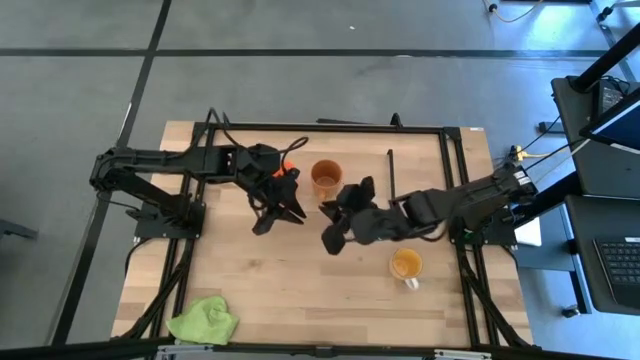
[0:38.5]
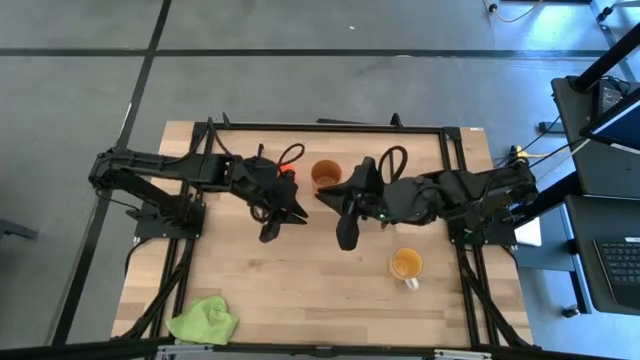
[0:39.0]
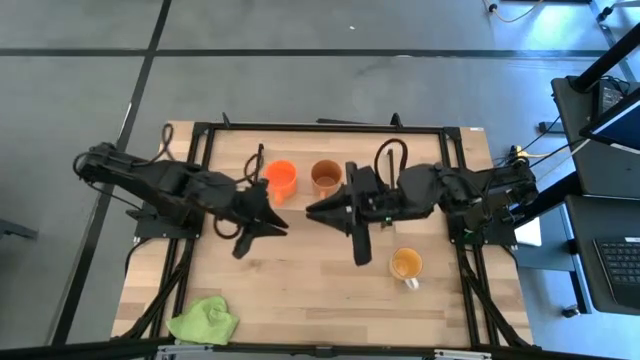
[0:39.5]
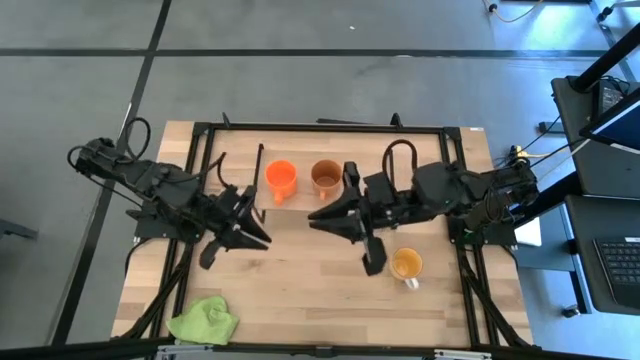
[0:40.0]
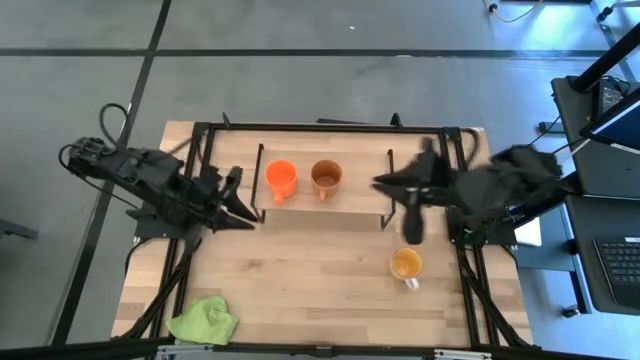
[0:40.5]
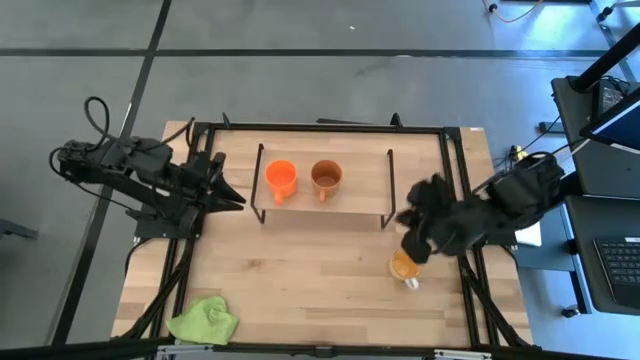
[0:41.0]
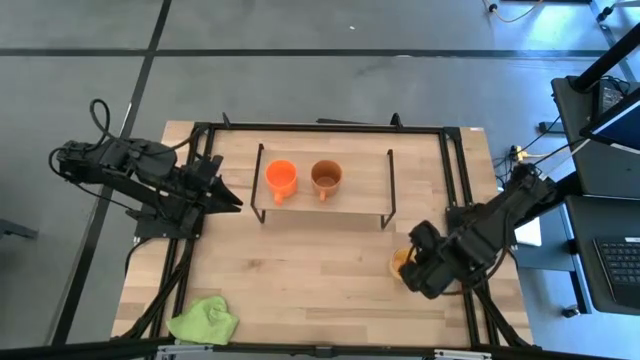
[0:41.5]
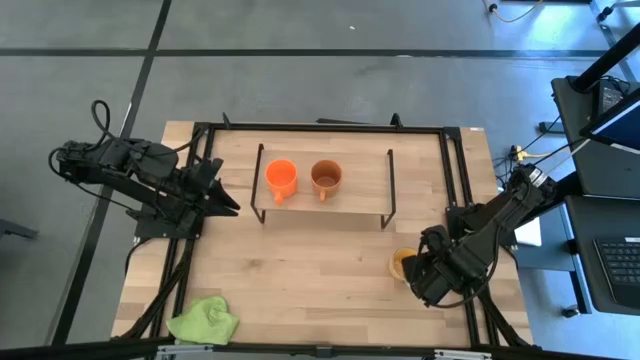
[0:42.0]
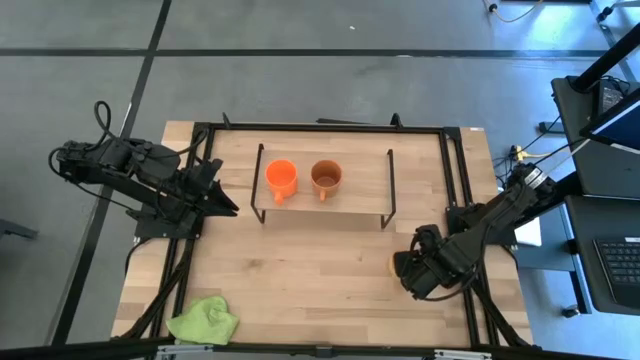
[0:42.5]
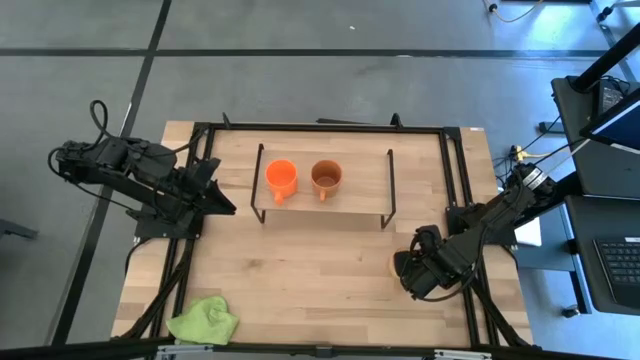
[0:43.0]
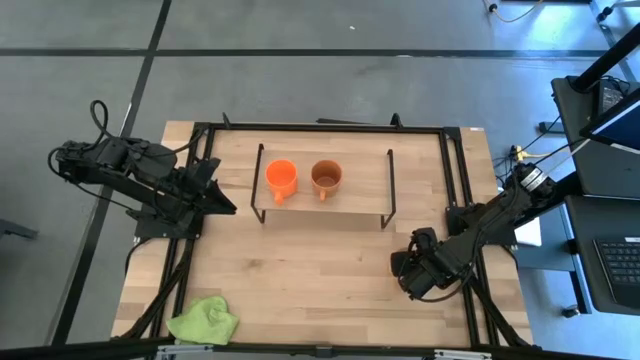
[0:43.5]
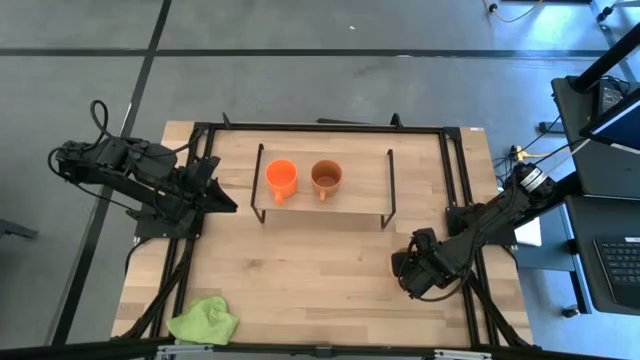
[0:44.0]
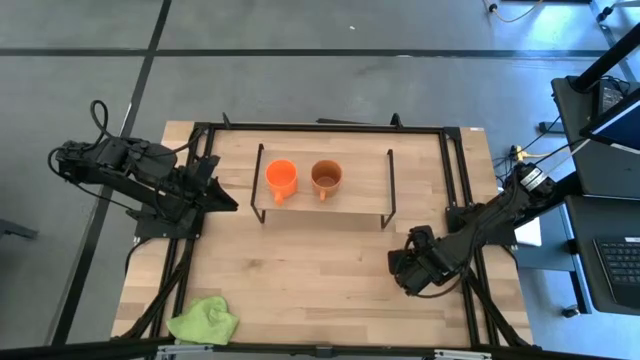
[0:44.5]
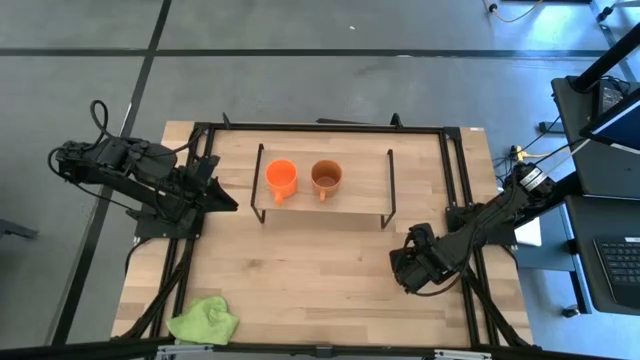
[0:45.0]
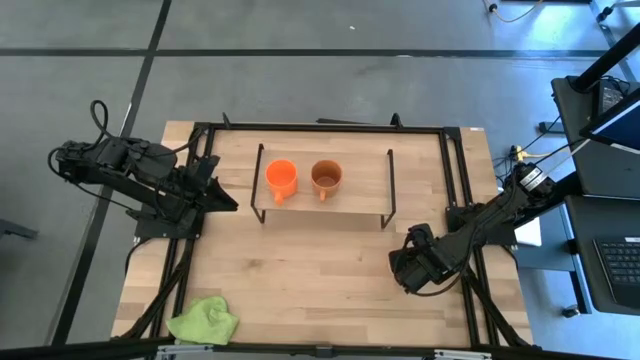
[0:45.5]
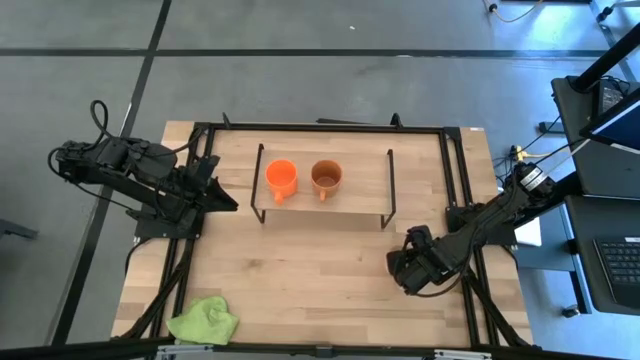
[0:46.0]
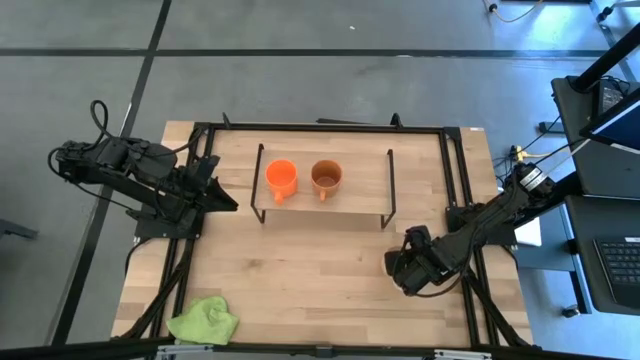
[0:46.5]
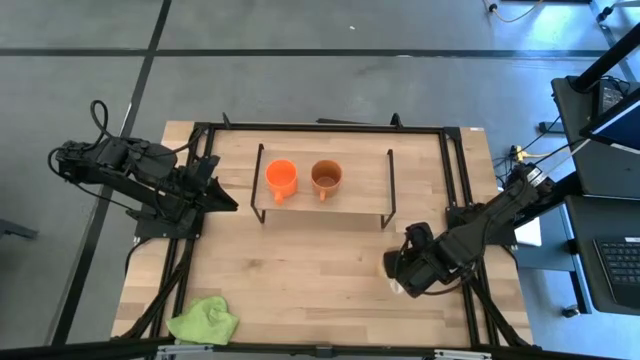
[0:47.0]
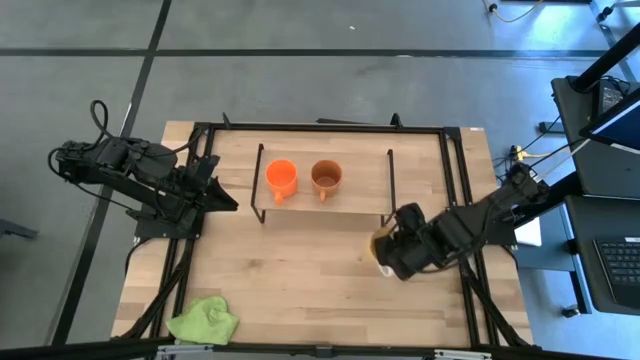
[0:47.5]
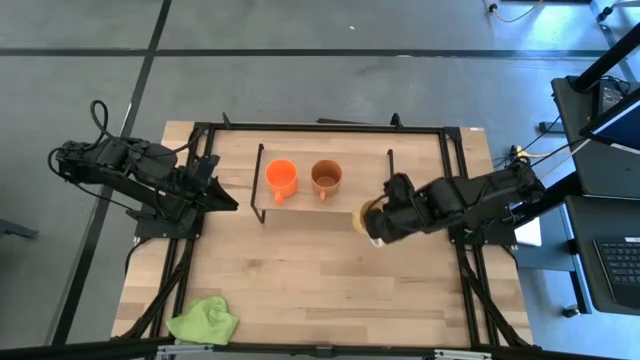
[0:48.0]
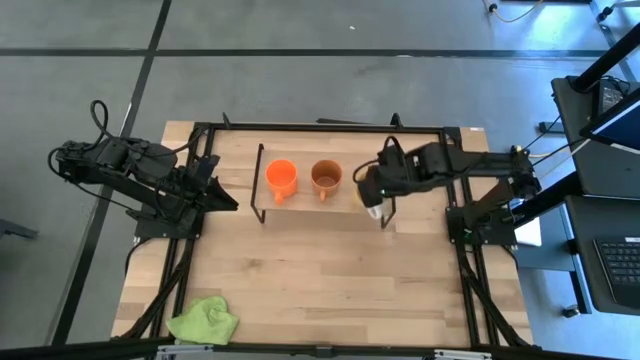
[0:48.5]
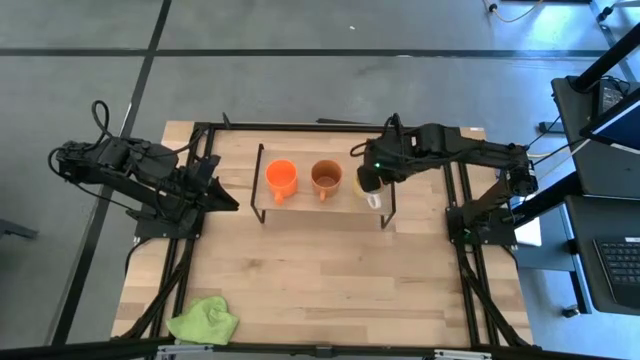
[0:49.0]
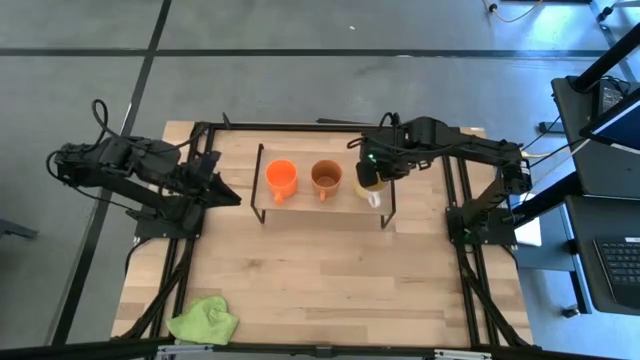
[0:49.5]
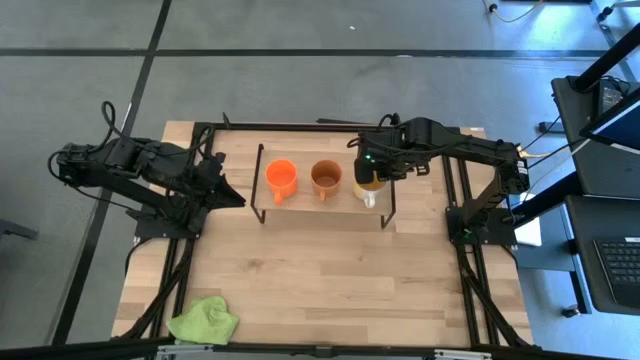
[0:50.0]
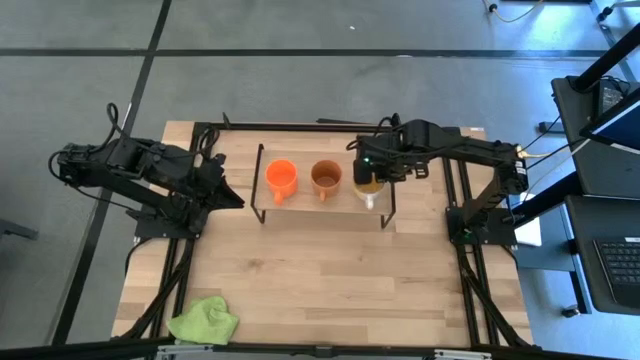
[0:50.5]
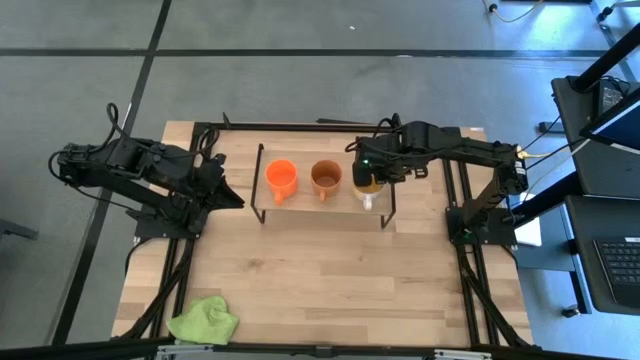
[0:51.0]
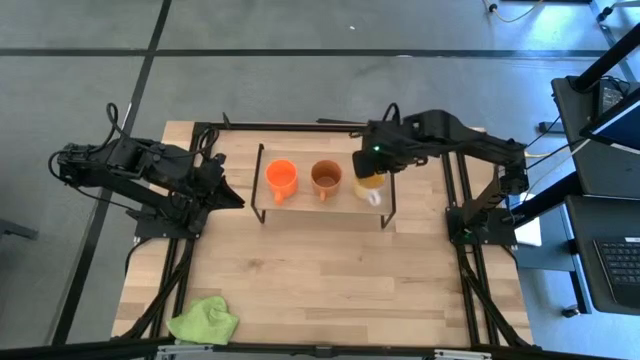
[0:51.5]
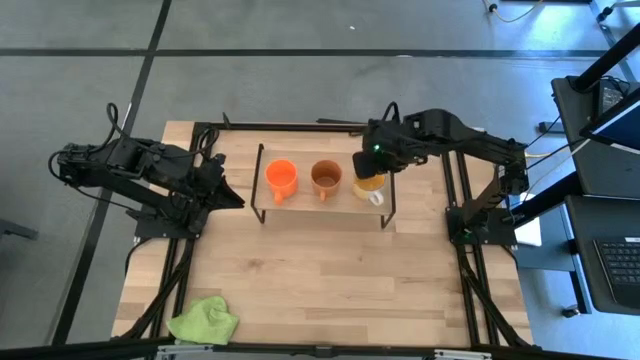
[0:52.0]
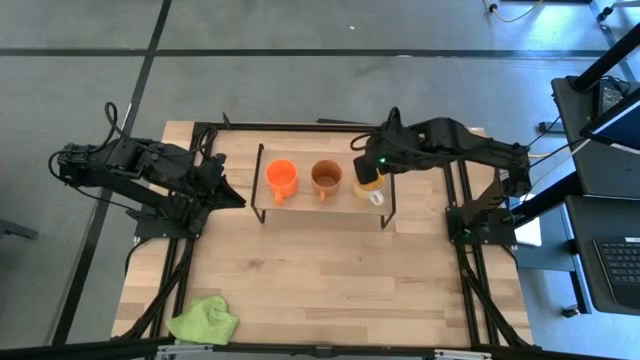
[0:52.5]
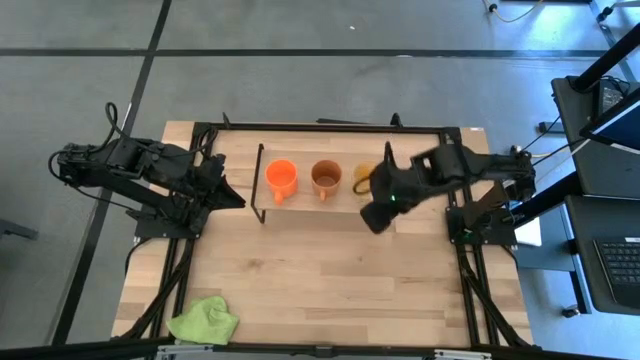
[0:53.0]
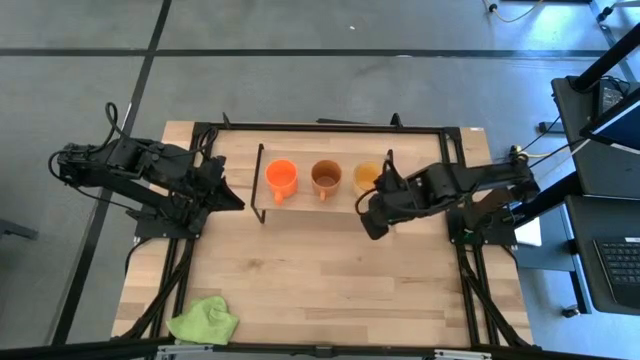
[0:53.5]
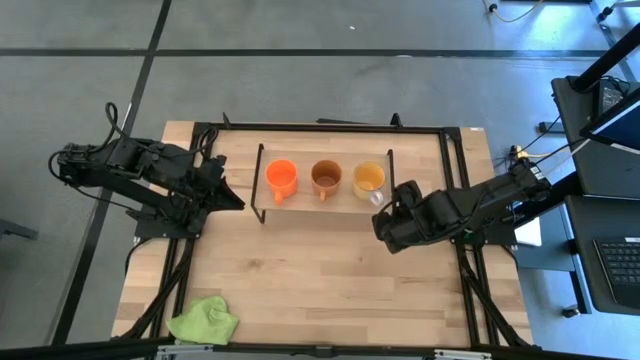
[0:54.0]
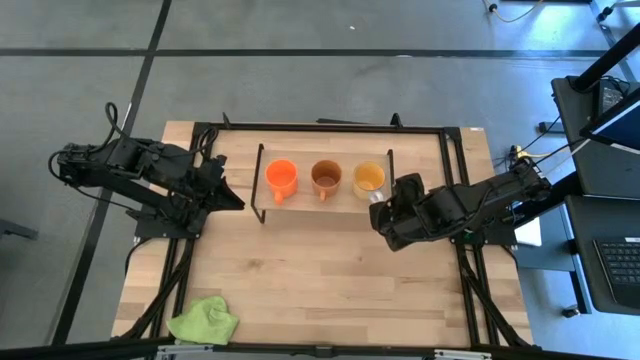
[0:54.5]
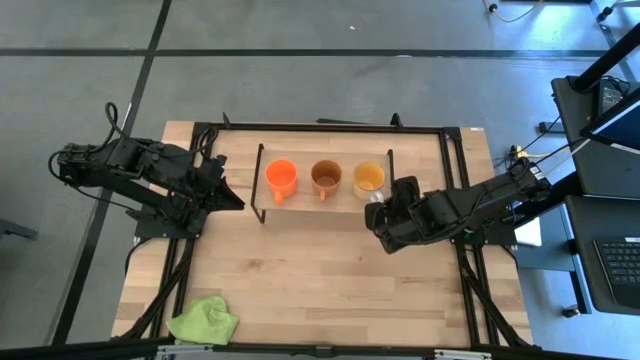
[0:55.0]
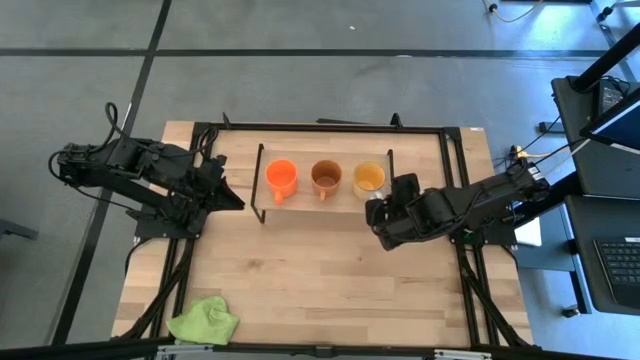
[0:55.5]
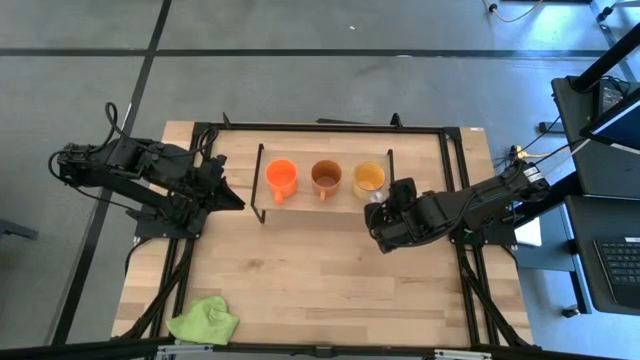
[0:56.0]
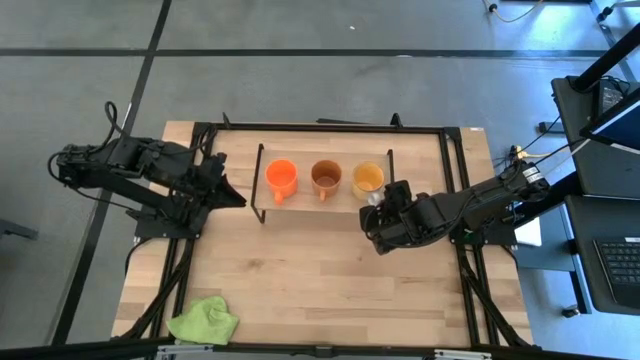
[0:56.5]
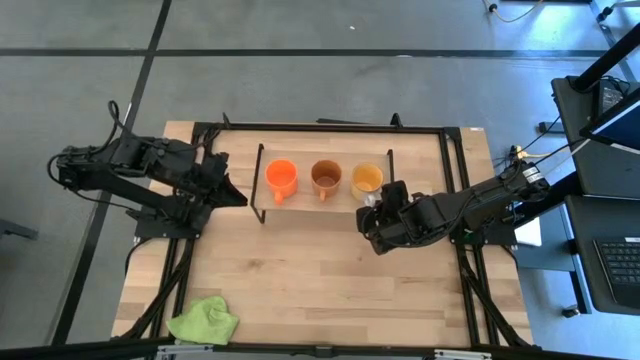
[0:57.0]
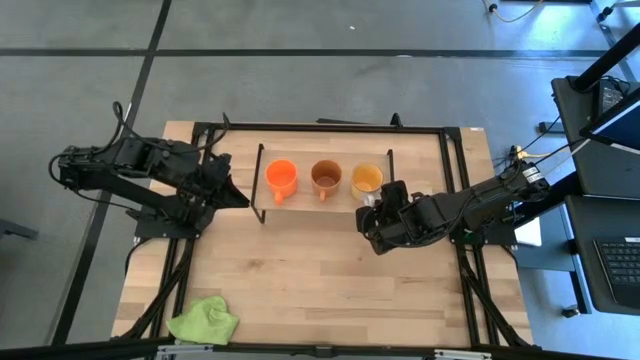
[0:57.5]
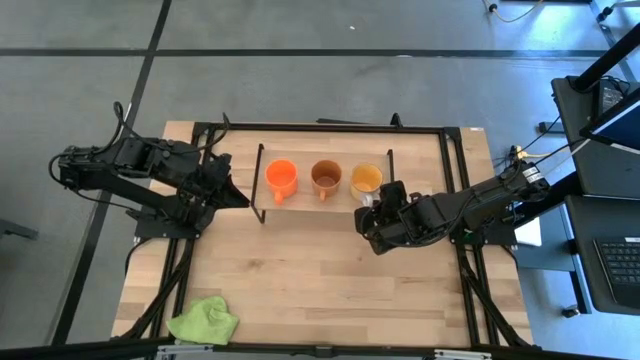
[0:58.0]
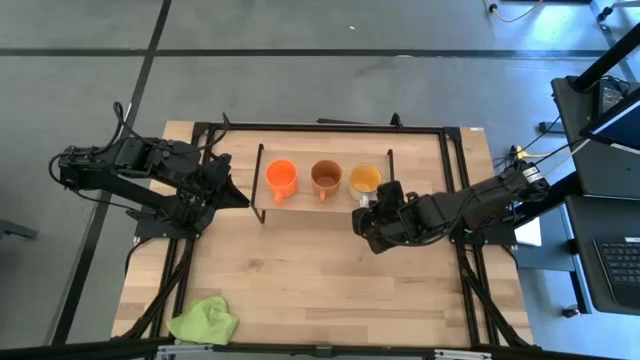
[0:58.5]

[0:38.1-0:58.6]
Task: Stack small to large cups/mugs on shelf
Put the yellow cup on the shelf

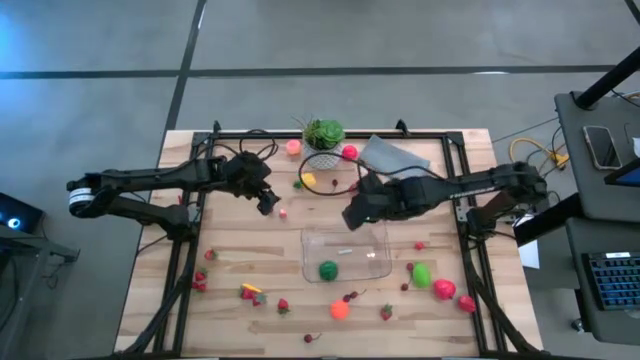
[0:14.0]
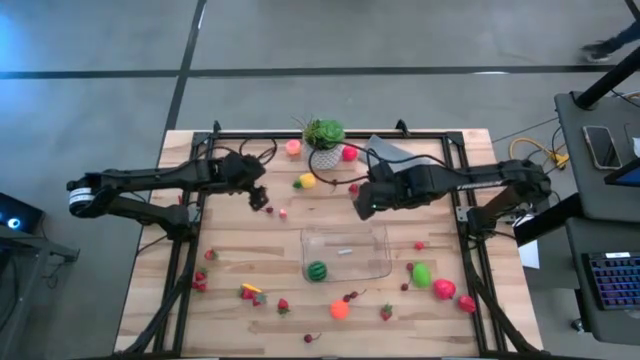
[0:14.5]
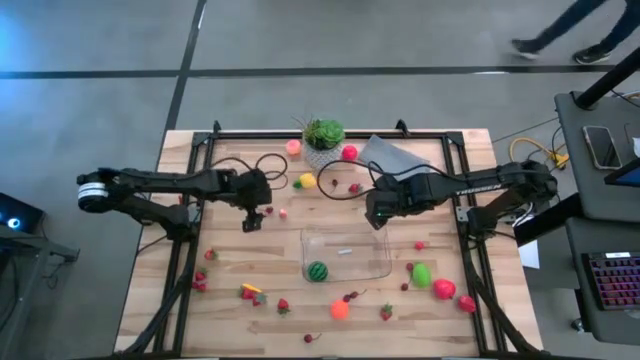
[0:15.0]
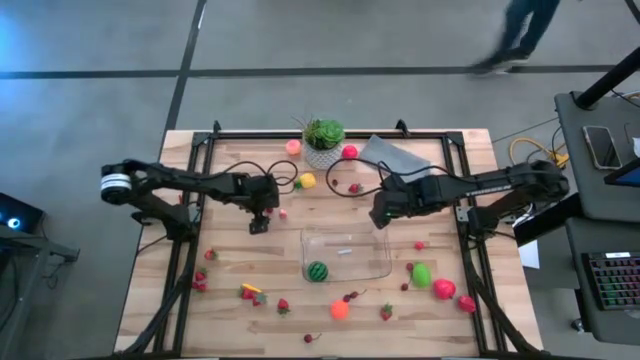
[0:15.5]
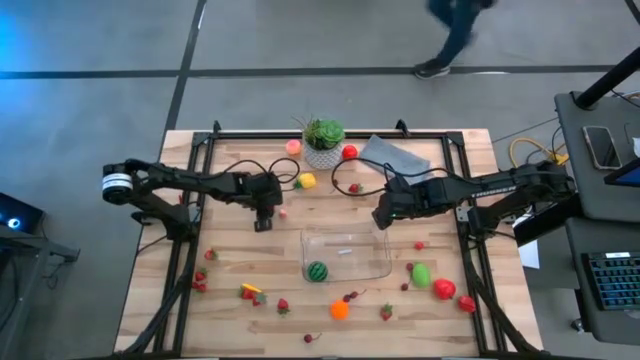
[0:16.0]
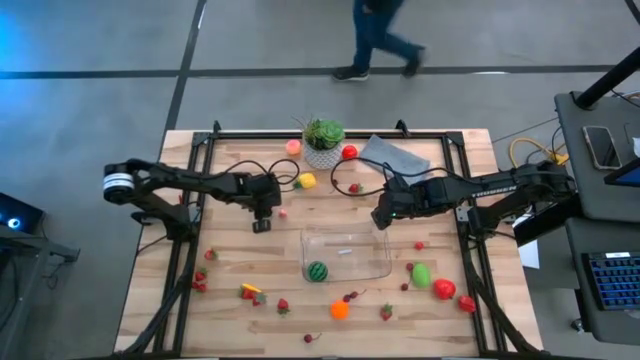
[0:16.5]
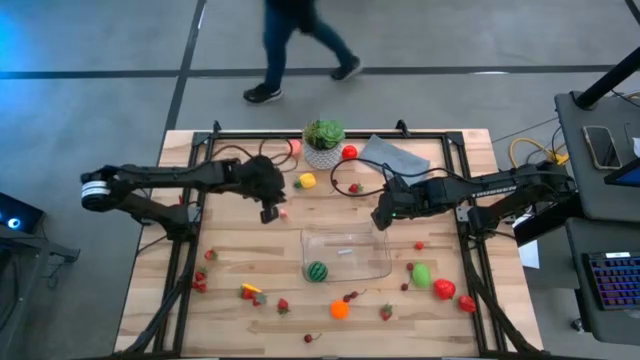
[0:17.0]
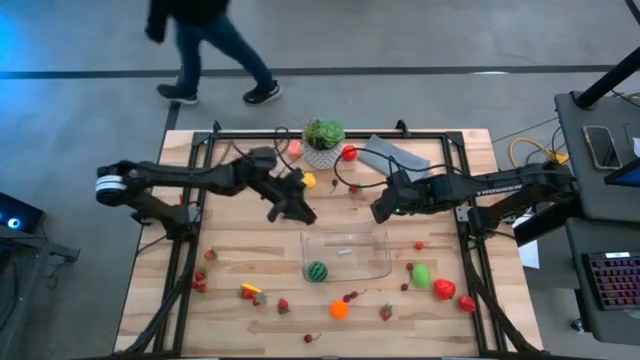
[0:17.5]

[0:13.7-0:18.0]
Task: Pick and placing Produce into tupperware
Put the cherry into the transparent bin
